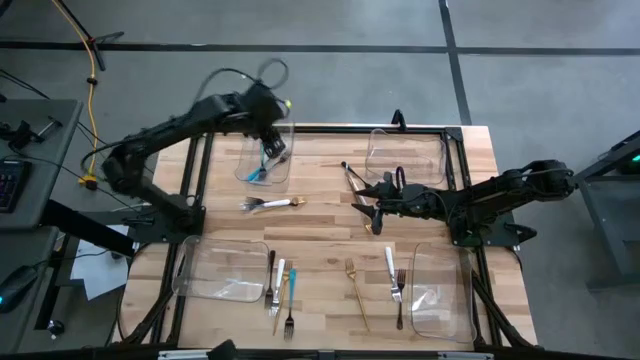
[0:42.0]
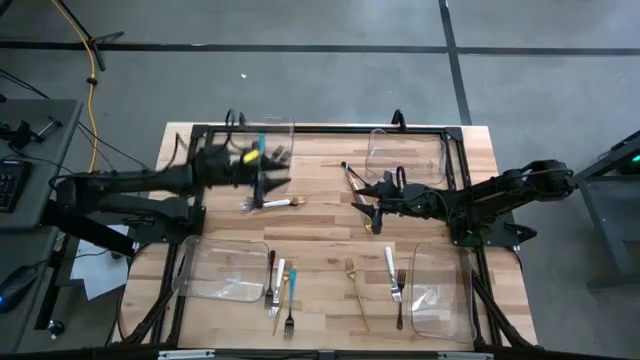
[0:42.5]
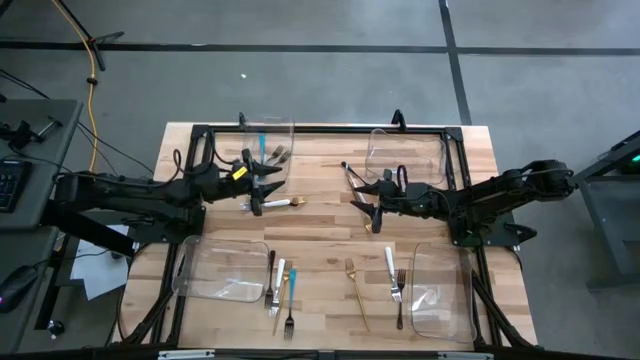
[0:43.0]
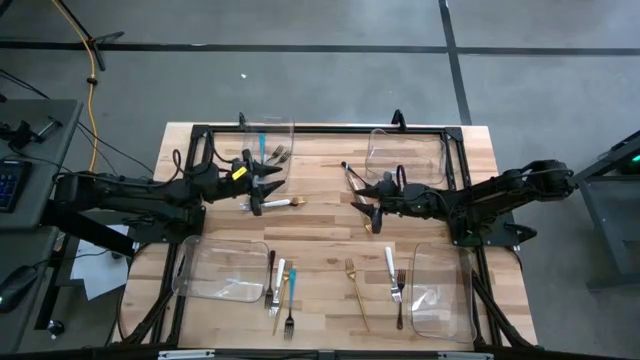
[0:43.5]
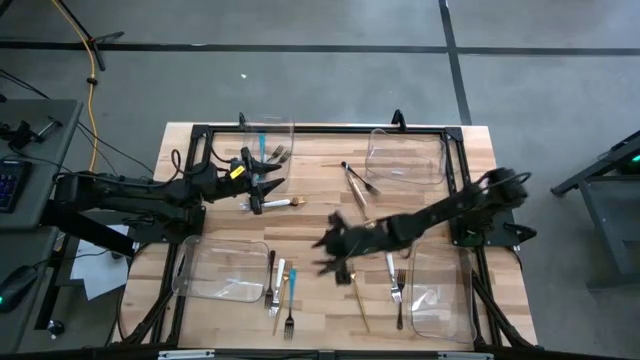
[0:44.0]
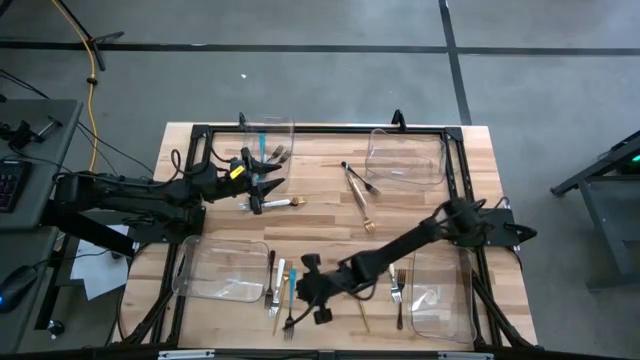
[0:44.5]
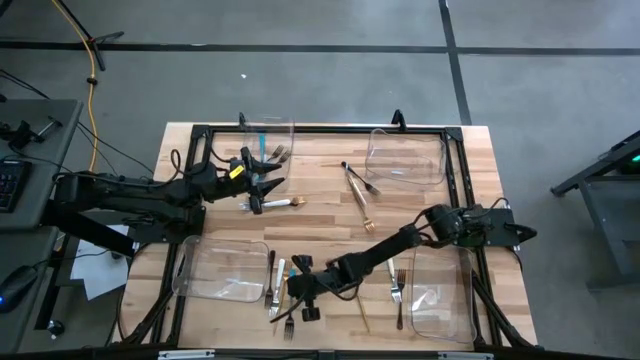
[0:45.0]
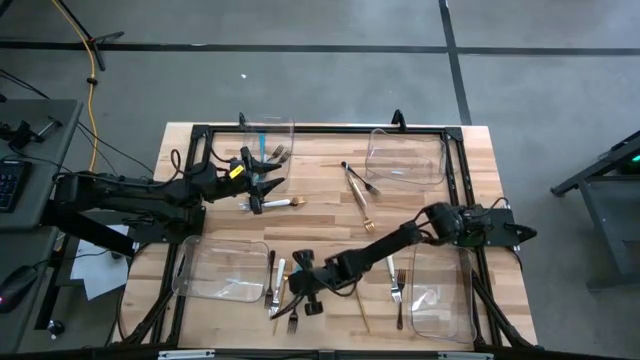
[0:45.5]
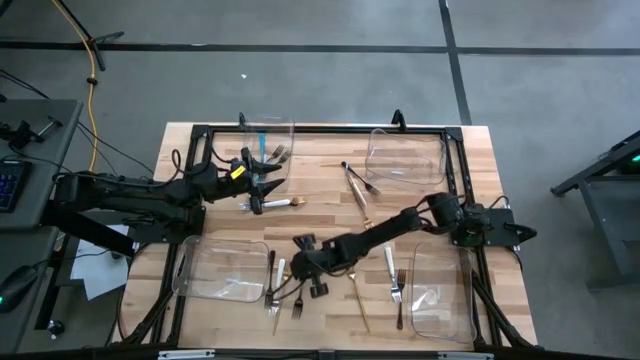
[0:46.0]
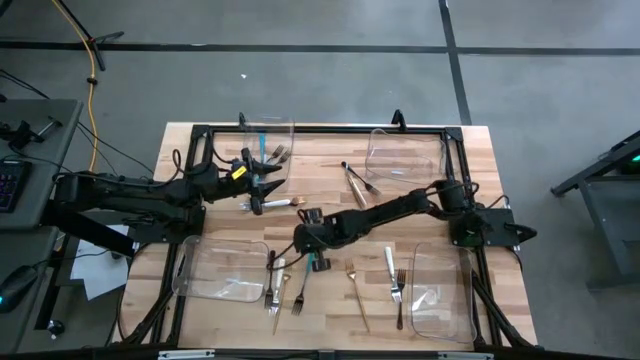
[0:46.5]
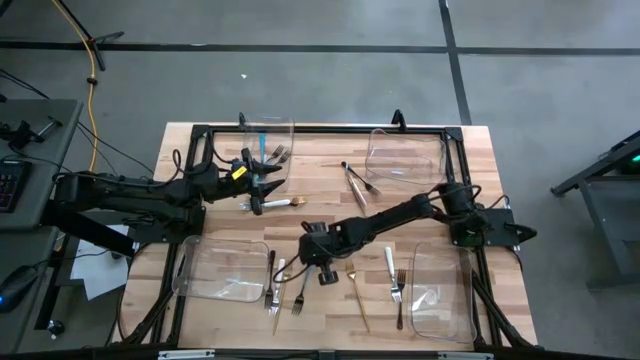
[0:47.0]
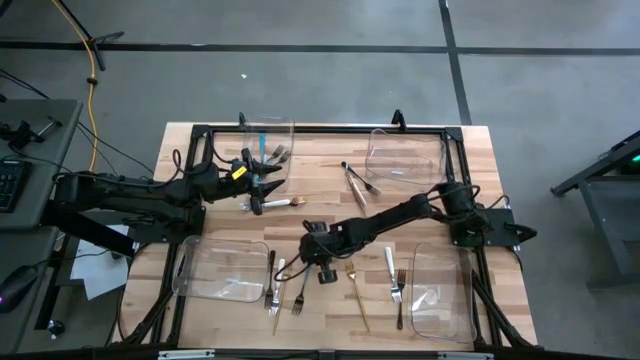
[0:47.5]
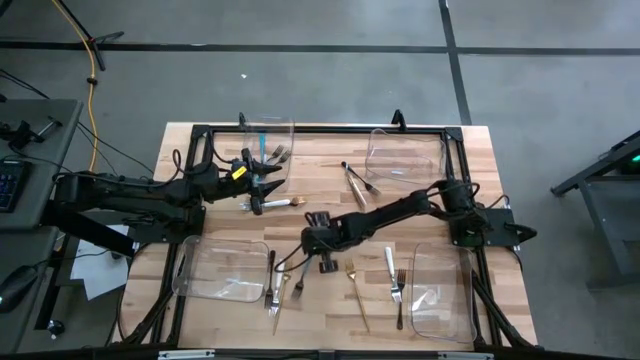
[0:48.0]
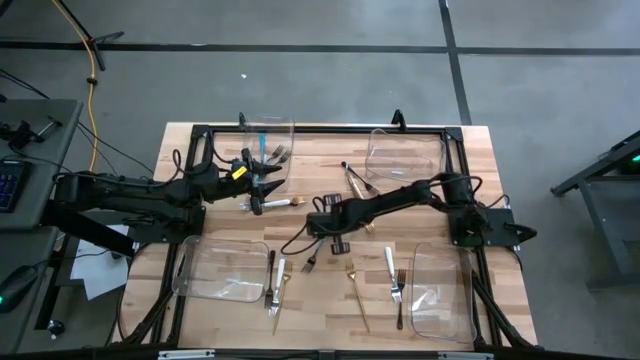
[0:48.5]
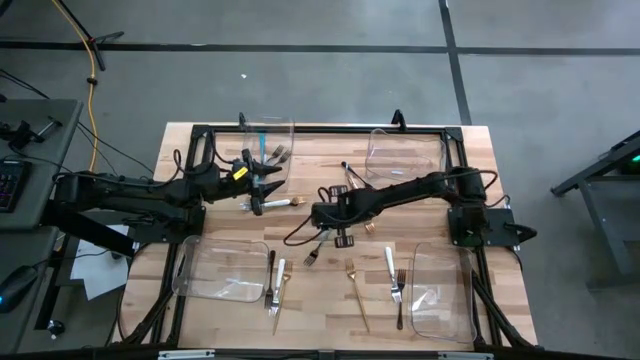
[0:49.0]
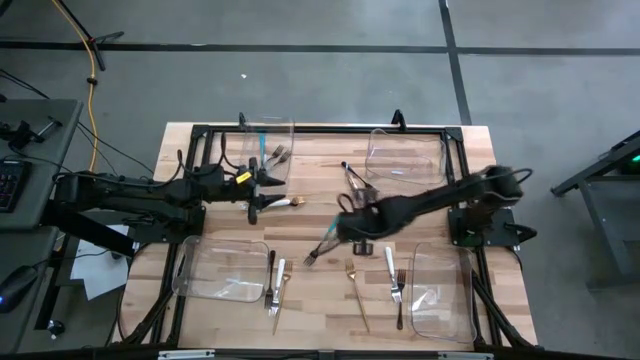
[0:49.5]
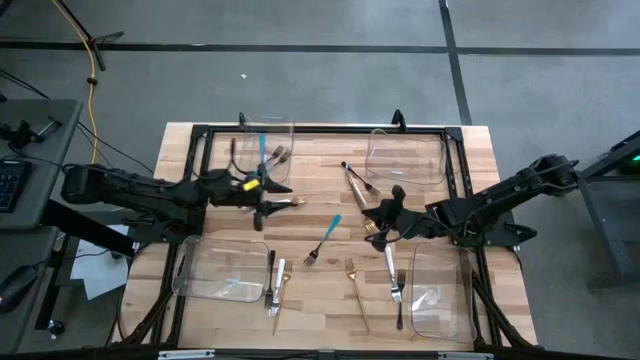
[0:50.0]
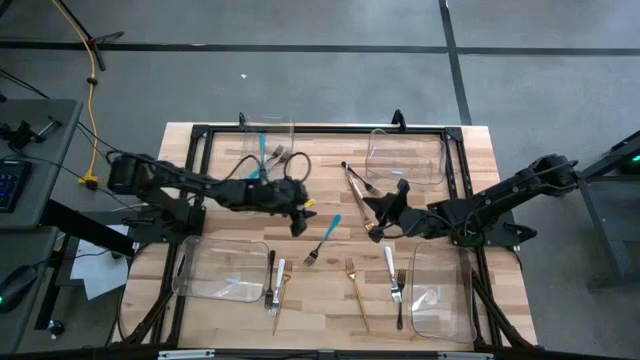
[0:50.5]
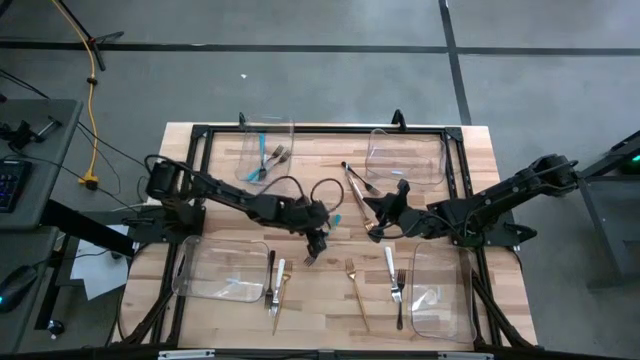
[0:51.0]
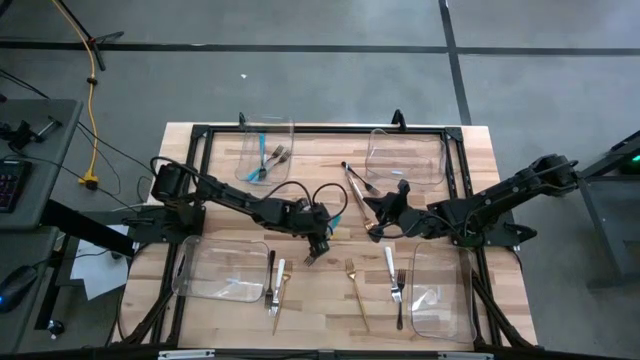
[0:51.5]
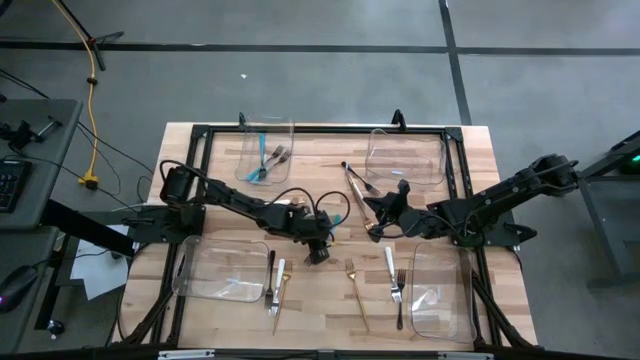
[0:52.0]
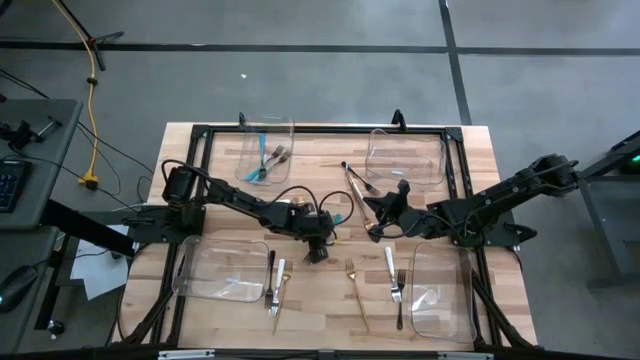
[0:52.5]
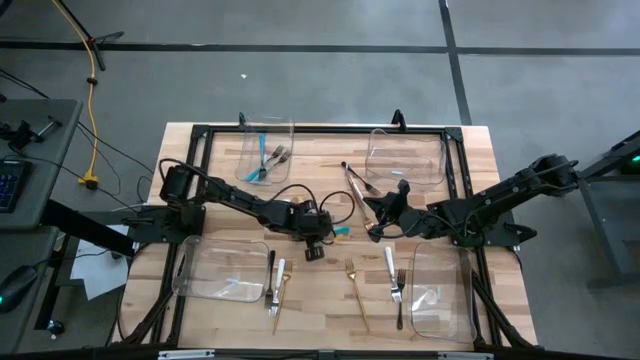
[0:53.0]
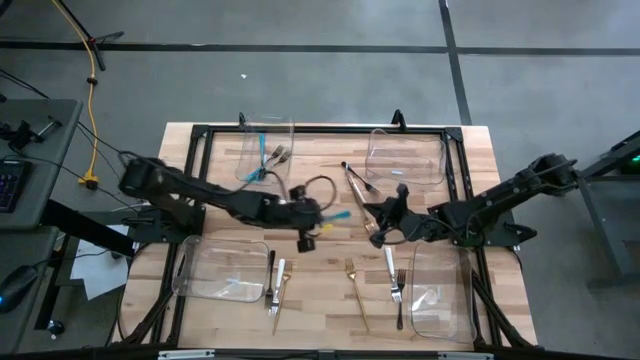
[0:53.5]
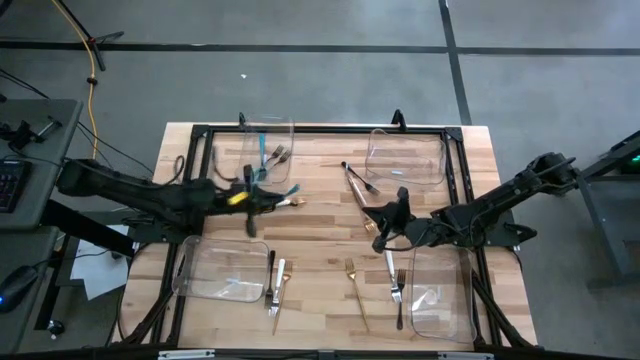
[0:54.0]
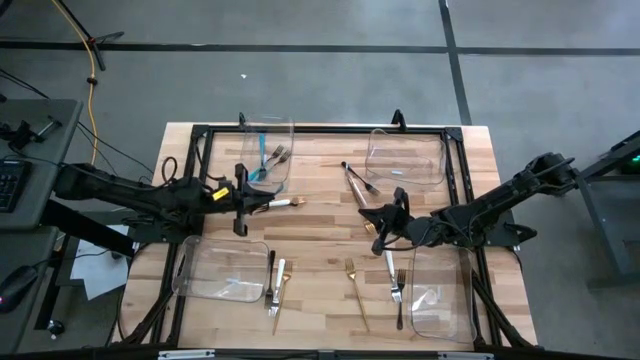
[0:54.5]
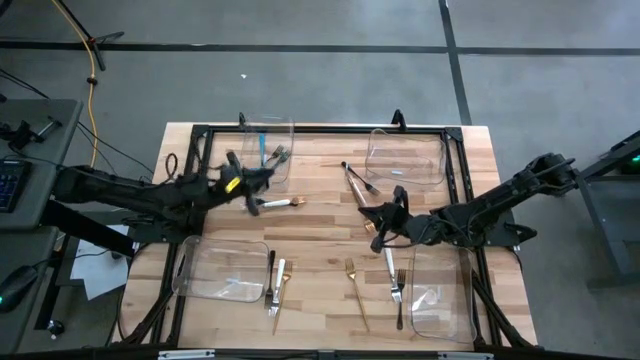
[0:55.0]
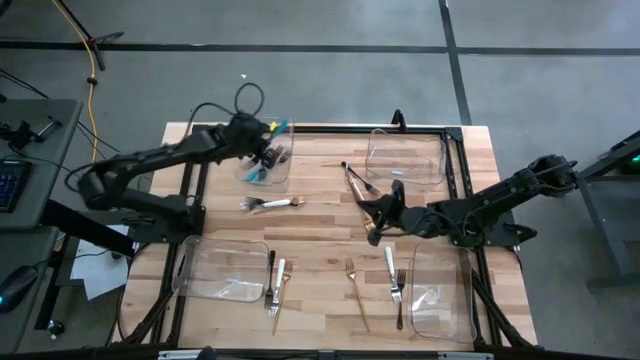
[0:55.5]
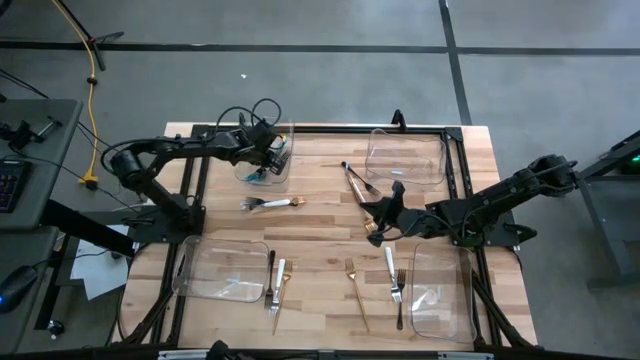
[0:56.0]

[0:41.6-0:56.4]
Task: Sort silverware by color (type)
Put the blue fork into the top left transparent bin

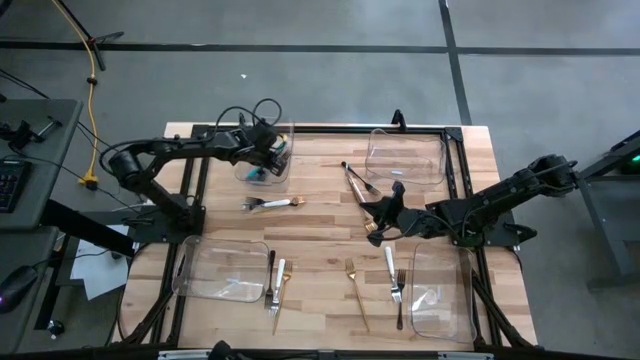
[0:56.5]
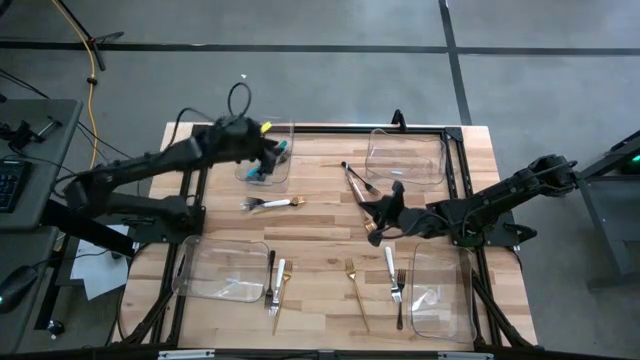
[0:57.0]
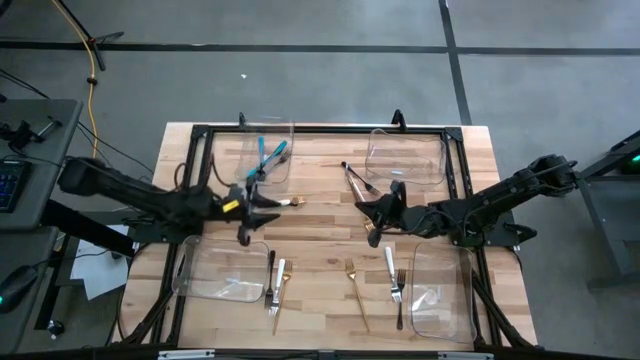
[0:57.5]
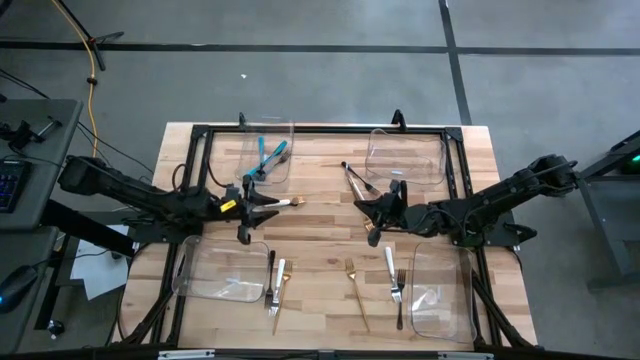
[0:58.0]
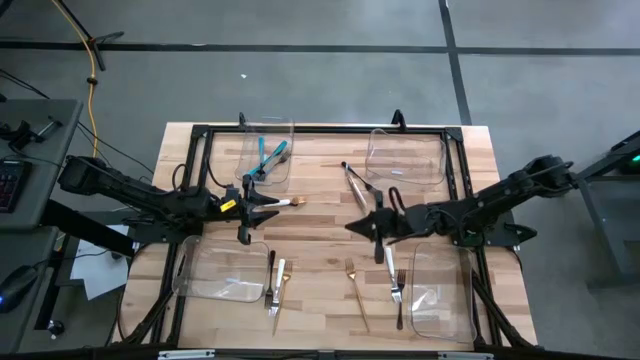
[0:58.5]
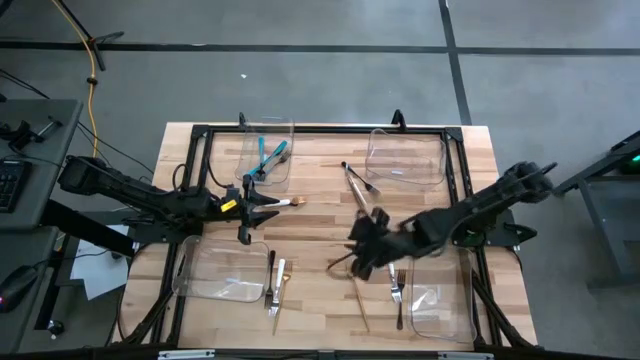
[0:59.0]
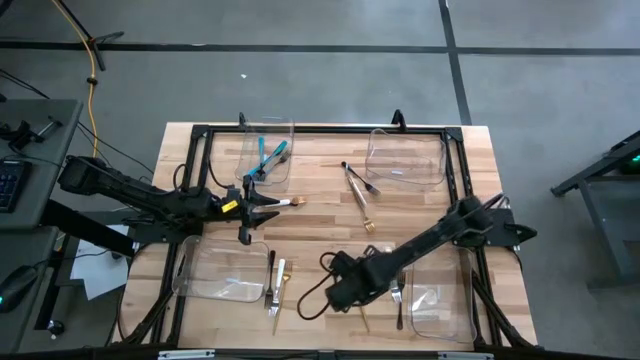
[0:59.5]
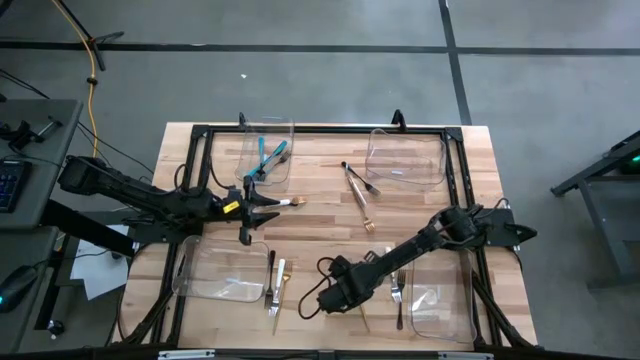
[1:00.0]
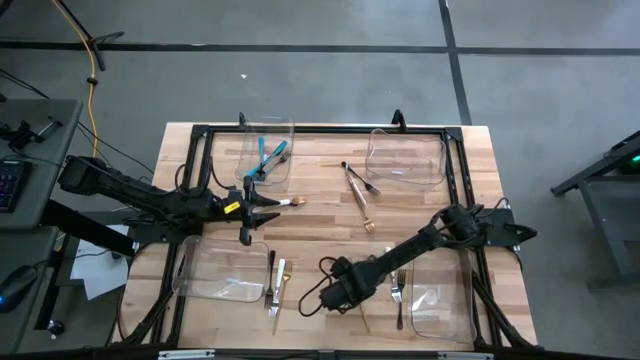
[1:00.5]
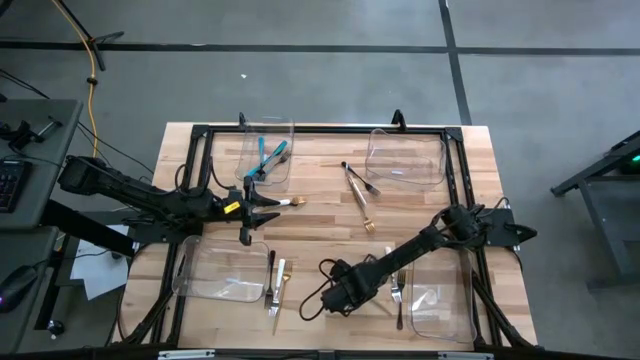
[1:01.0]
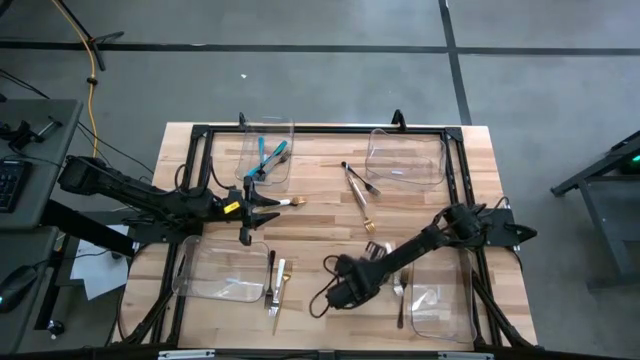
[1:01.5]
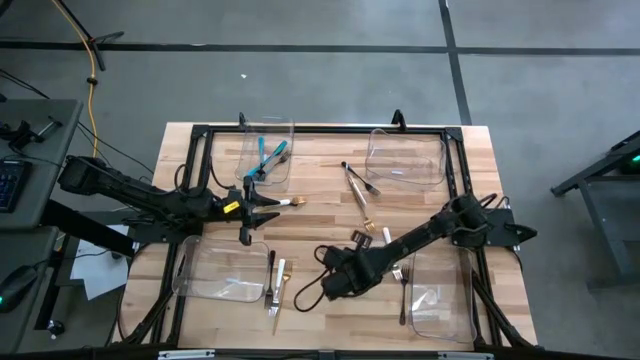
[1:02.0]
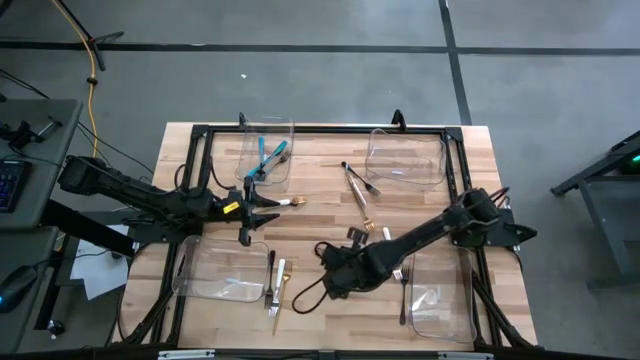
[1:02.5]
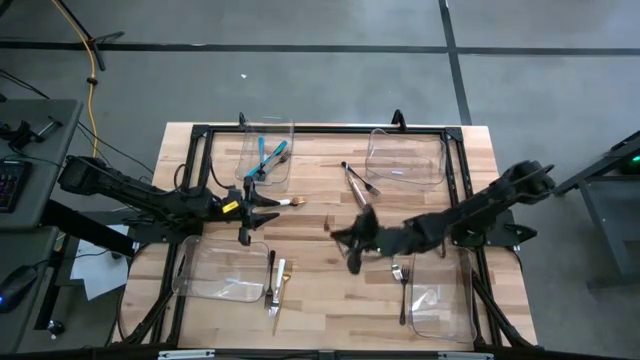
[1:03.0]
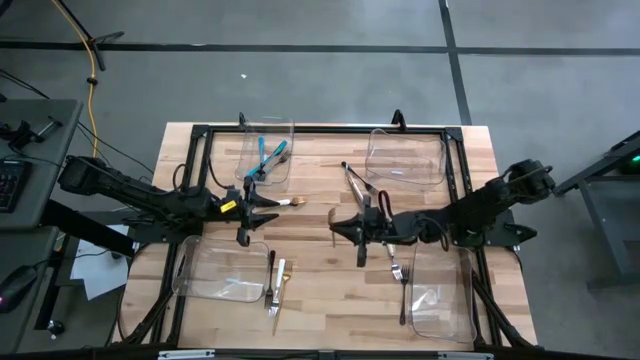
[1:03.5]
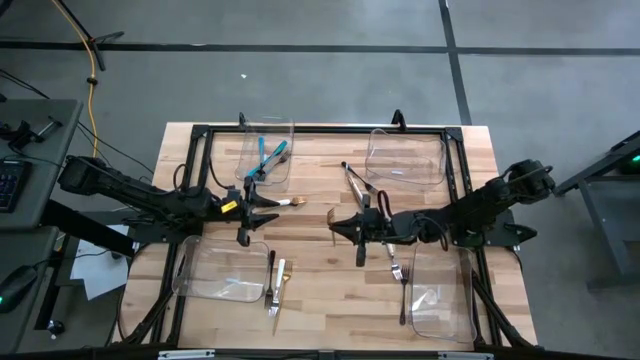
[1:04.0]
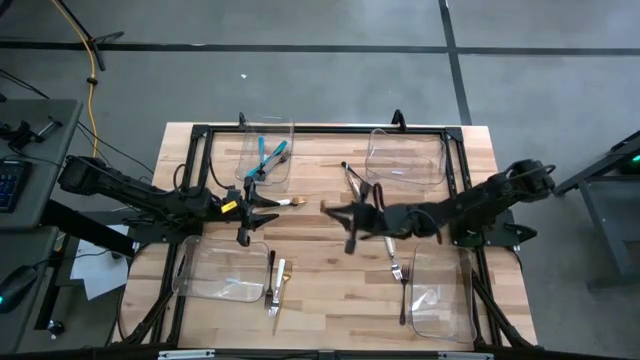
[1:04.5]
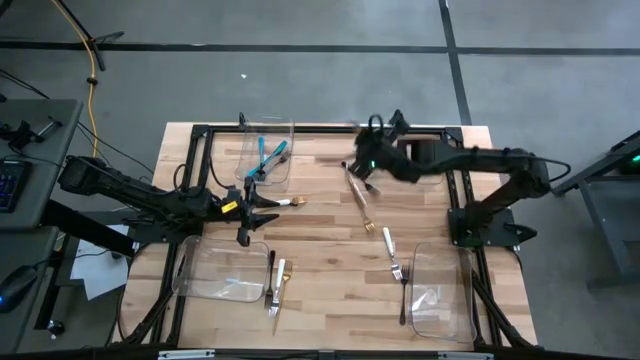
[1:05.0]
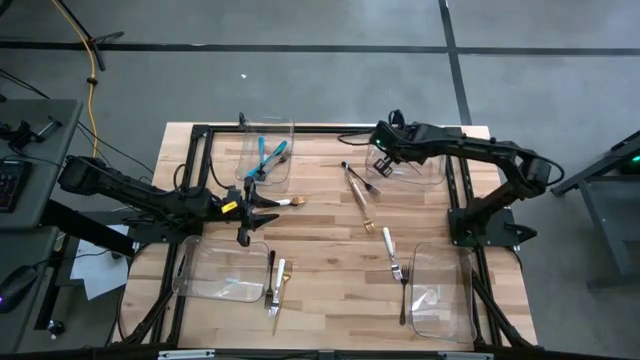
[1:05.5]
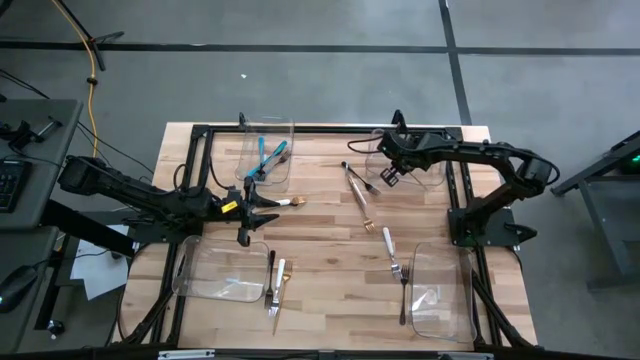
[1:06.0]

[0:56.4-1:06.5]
Put the gold fork into the top right transparent bin
